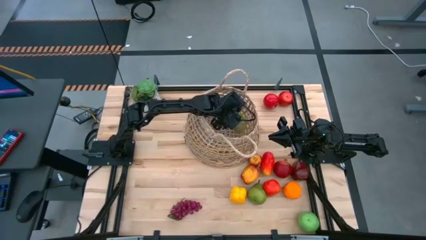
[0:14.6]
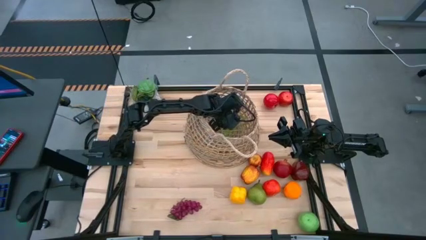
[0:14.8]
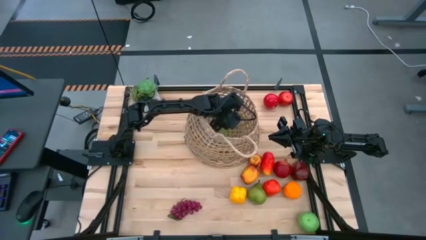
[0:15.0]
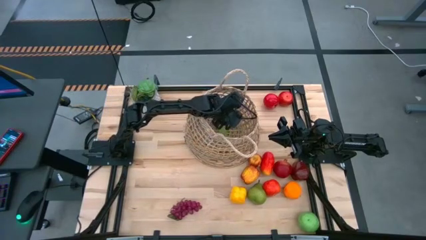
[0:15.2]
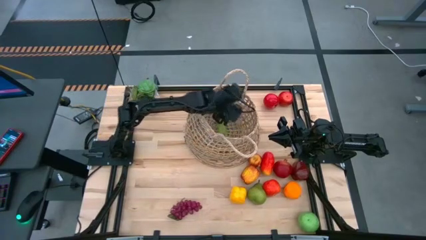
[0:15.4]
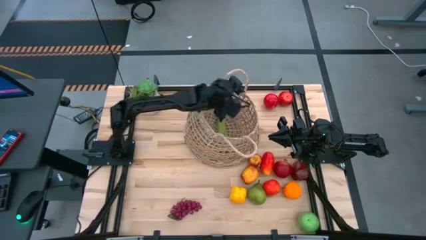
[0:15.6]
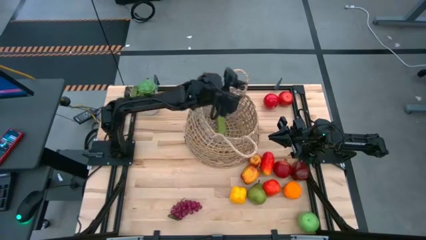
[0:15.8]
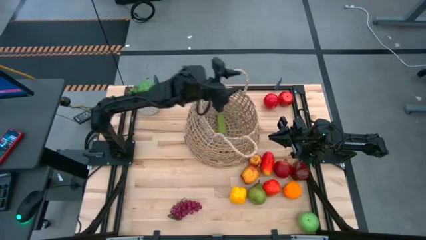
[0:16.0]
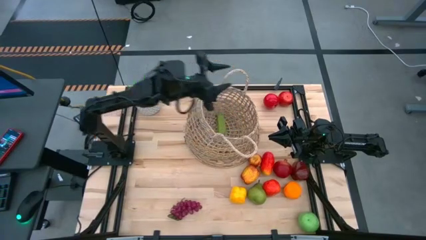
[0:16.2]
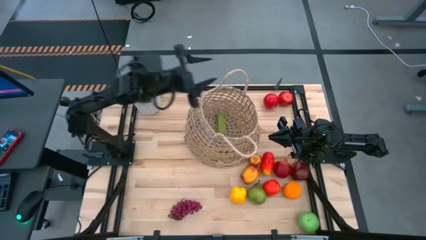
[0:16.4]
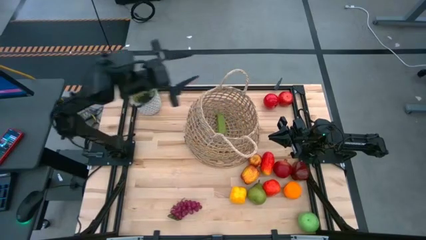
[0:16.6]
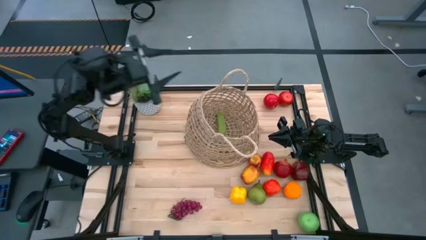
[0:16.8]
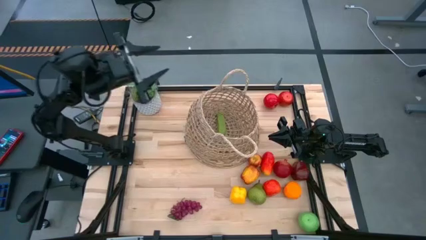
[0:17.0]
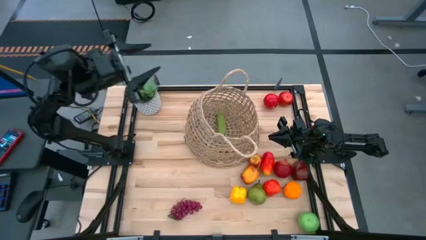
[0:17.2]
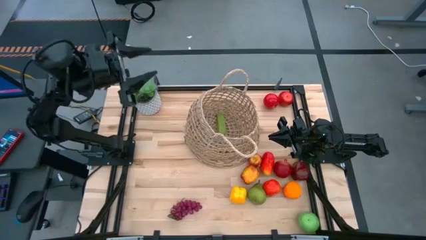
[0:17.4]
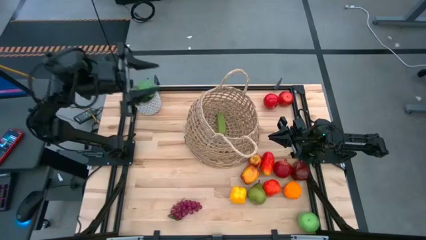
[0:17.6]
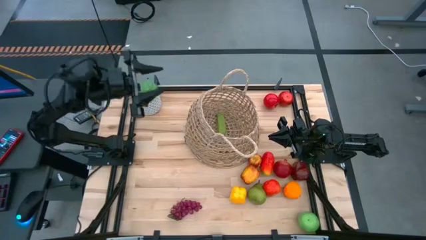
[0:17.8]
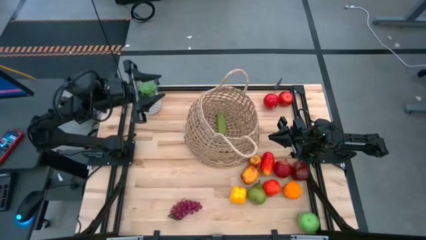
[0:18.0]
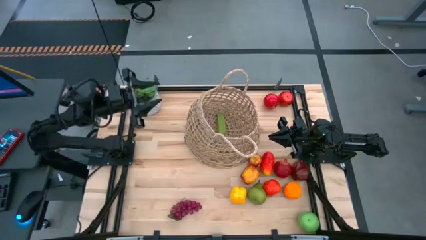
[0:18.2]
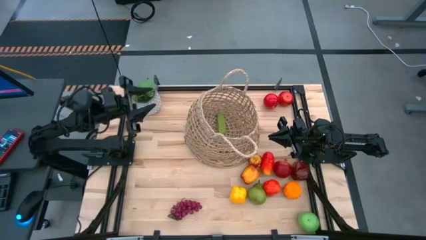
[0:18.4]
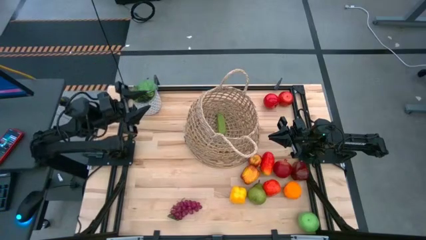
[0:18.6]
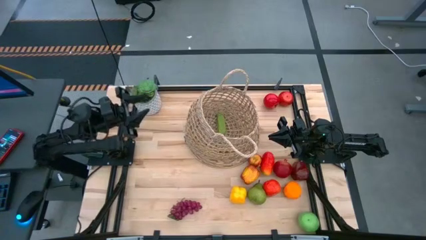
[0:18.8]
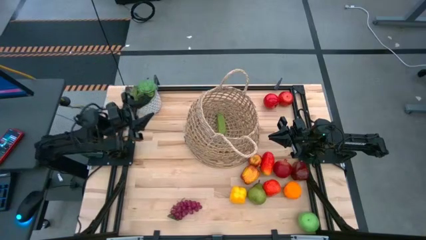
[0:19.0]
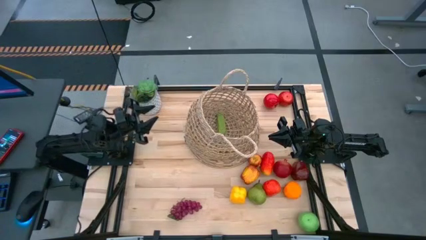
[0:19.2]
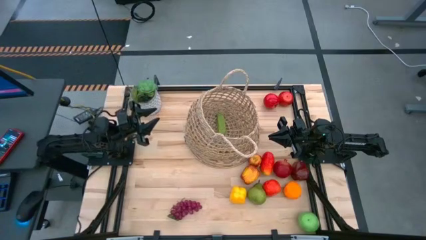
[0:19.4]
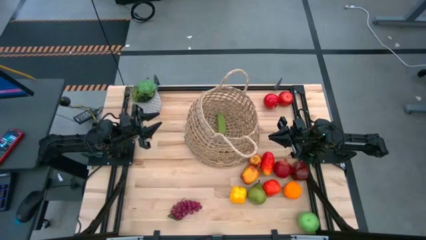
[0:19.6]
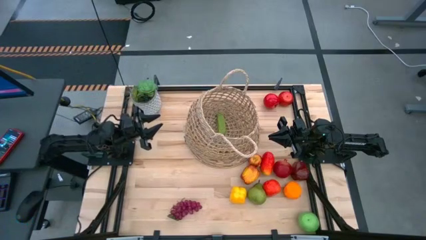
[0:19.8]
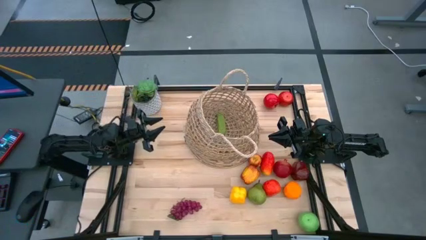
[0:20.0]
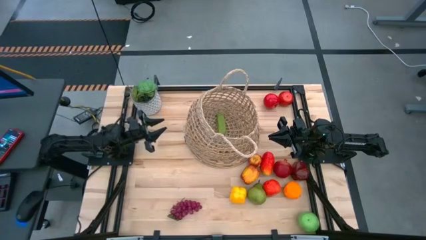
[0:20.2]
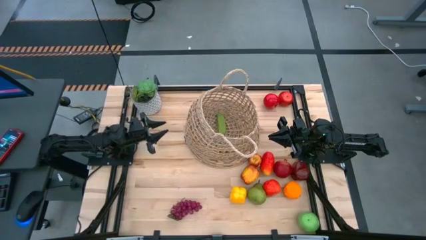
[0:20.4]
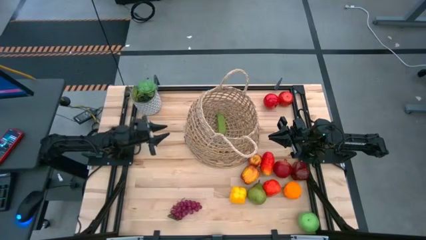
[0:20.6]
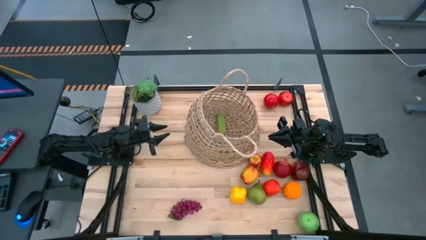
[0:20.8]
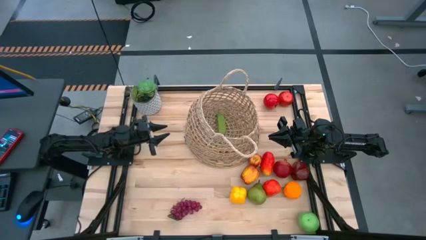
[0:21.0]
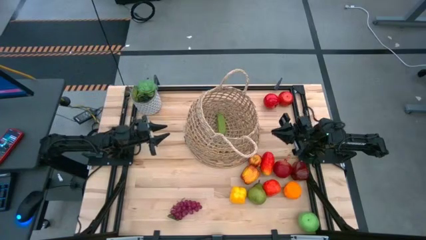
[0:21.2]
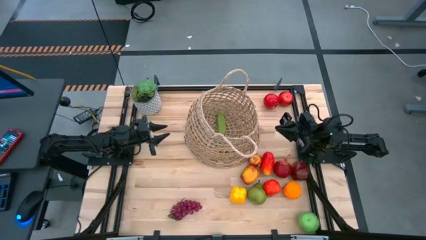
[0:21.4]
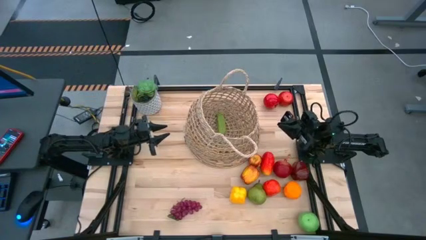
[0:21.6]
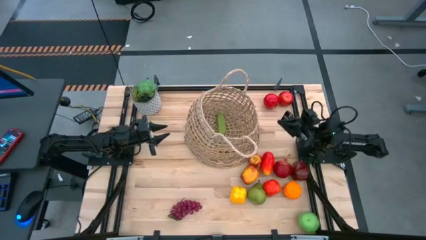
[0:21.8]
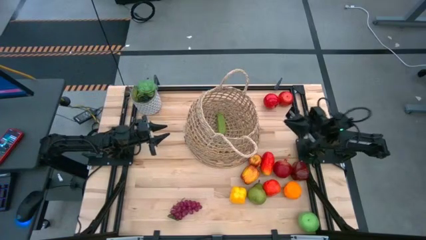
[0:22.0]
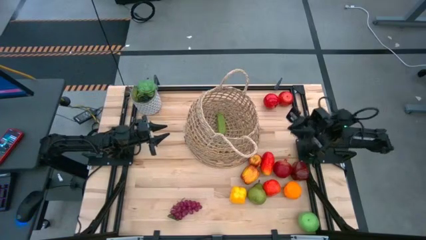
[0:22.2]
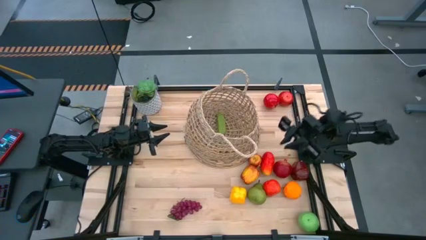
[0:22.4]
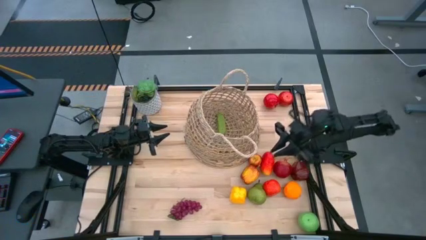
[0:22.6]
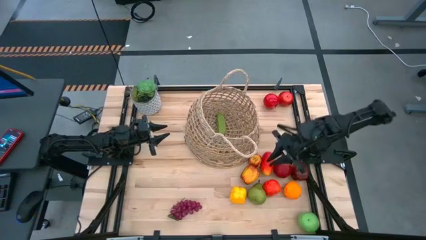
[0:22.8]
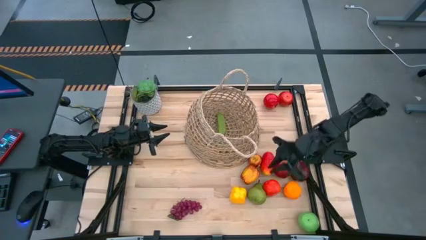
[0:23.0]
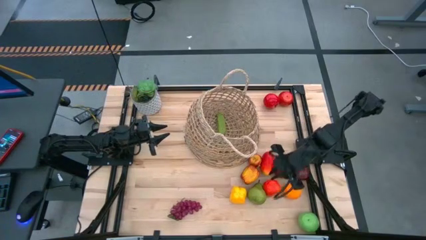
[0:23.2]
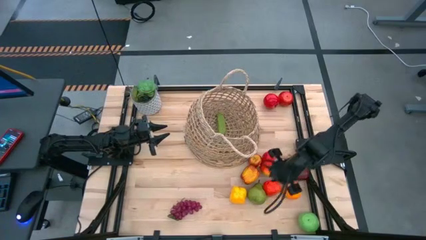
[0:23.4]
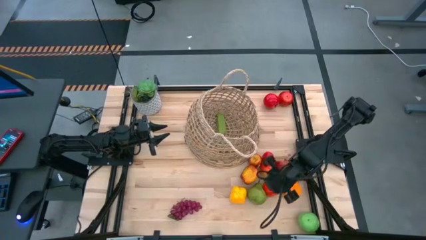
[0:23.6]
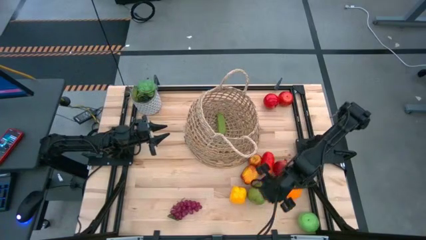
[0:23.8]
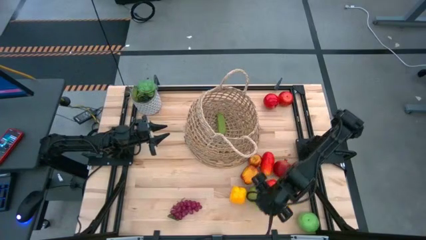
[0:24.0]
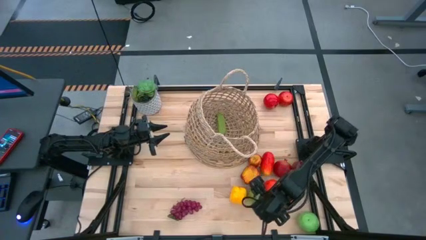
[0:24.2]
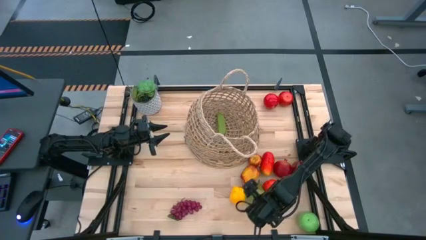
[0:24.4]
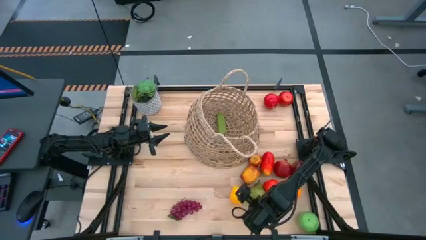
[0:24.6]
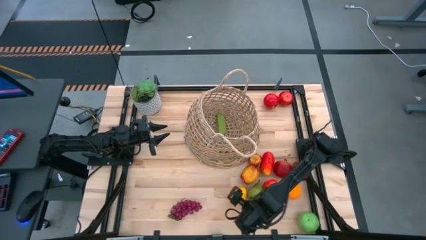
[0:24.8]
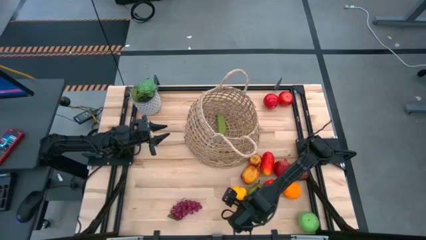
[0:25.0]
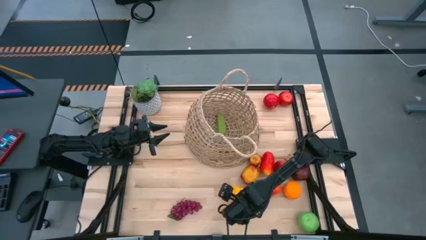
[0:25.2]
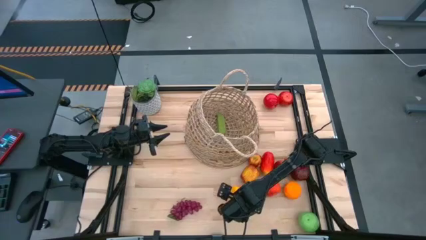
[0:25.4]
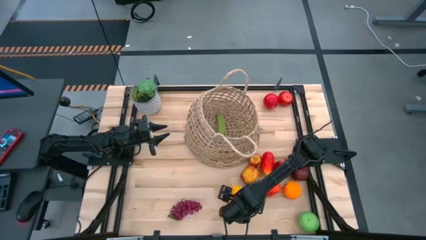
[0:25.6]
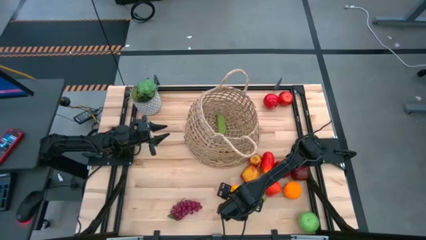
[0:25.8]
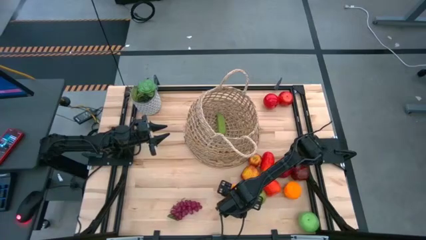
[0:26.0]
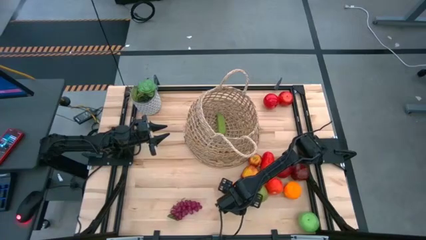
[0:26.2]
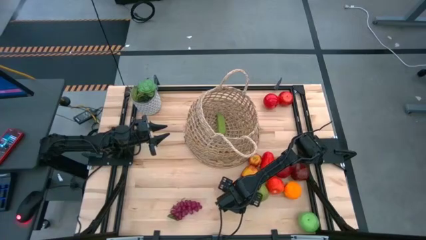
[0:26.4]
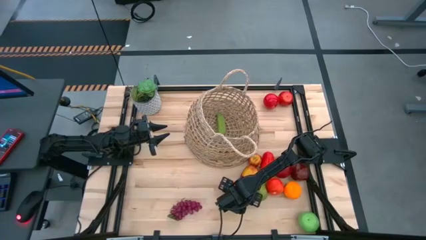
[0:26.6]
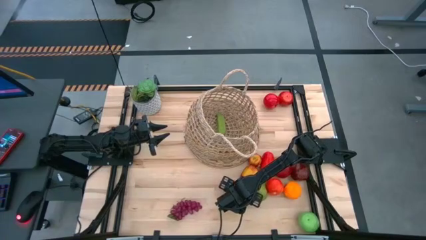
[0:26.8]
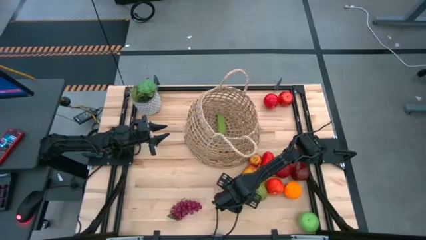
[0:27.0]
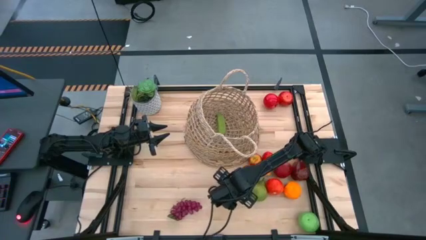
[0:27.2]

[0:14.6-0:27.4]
Task: Build produce basket
Put the yellow bell pepper into the brown basket
